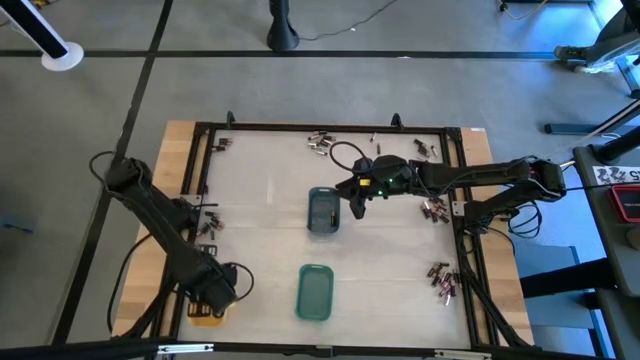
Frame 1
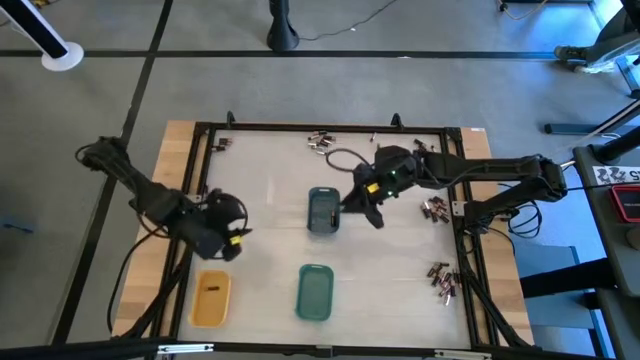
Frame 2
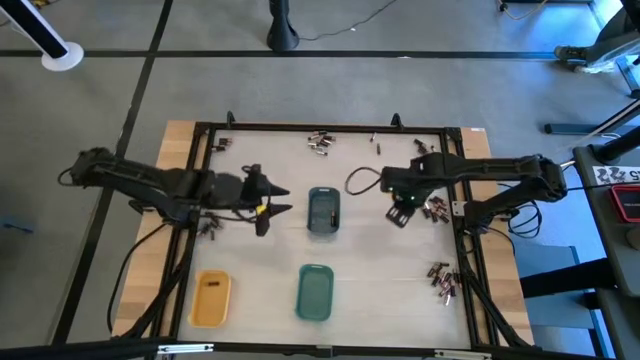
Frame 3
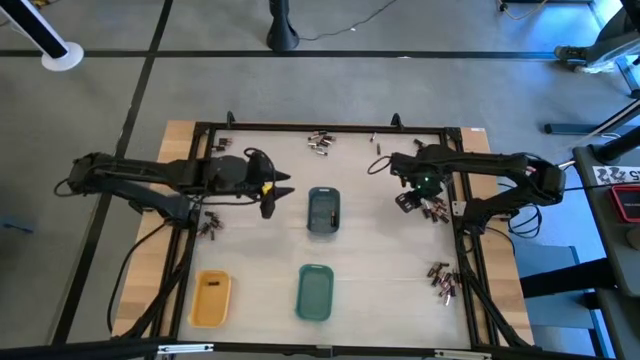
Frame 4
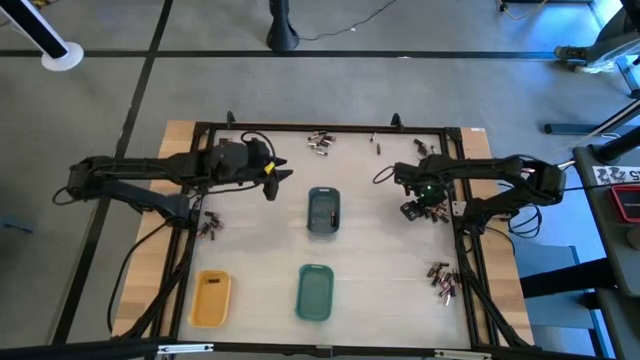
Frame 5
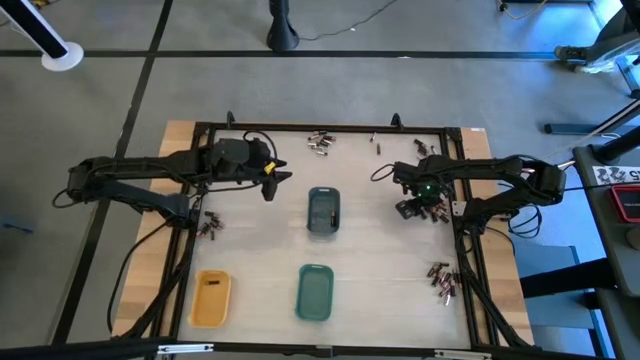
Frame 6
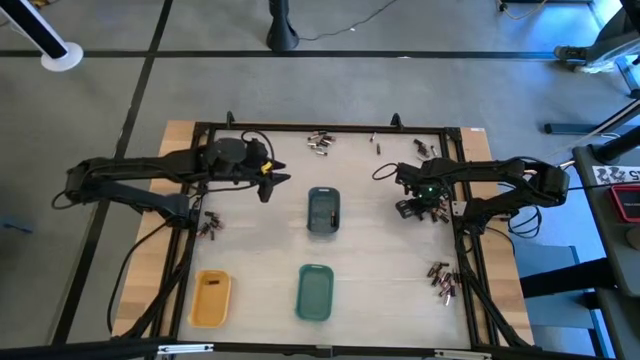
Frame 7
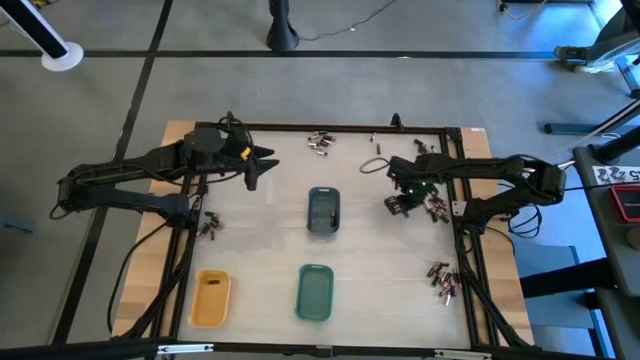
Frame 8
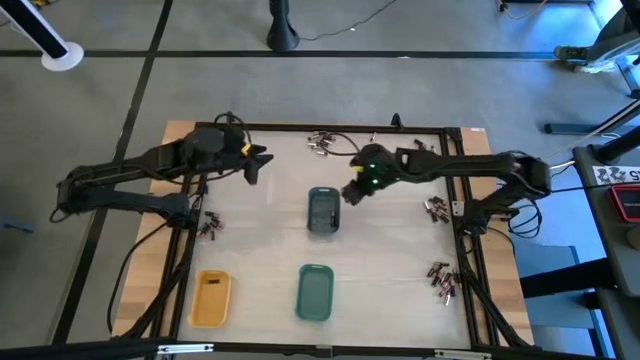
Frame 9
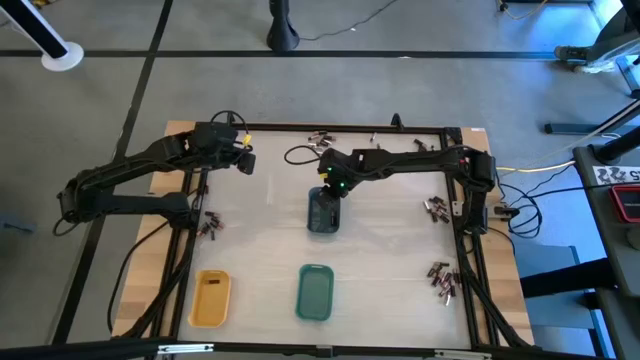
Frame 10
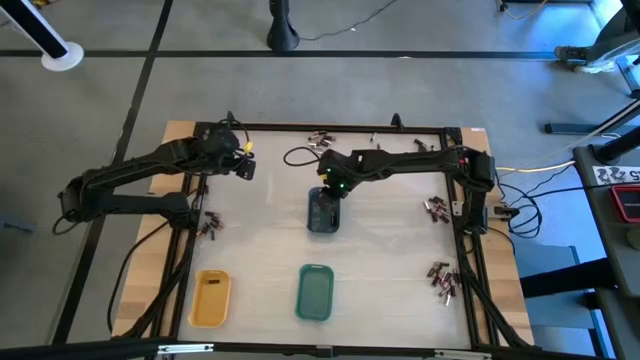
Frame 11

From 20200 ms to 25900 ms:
Task: Sort batteries
Put the large black battery into the blue bin

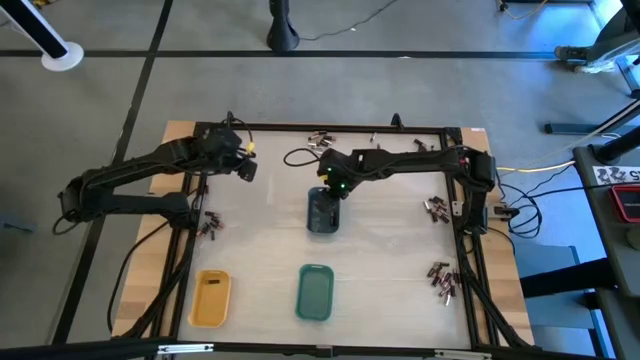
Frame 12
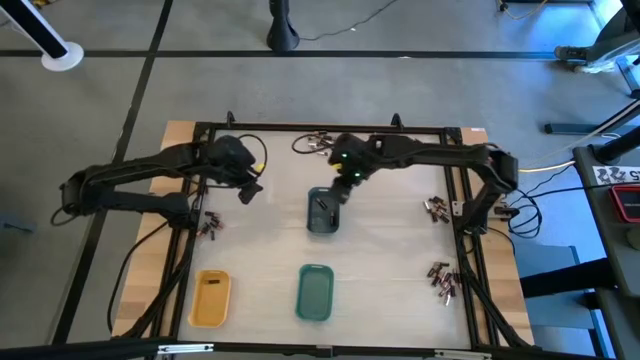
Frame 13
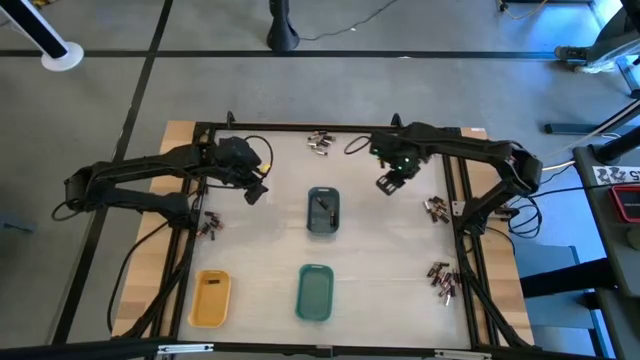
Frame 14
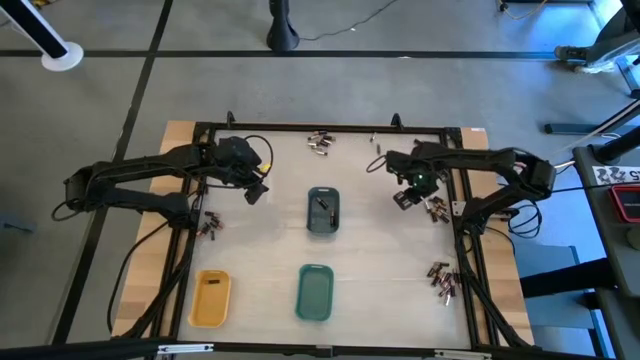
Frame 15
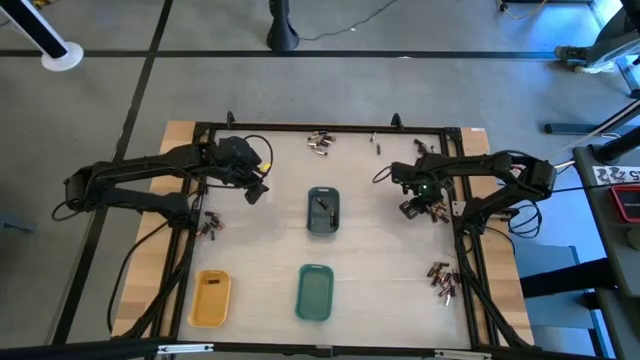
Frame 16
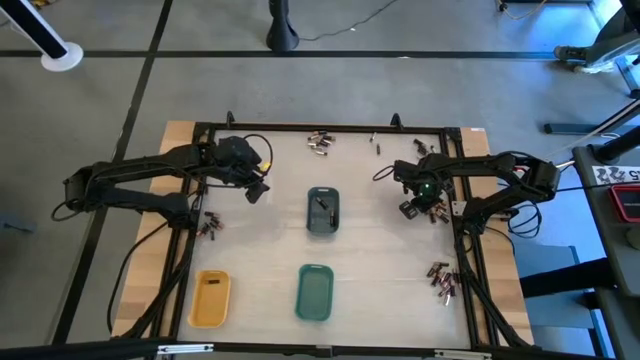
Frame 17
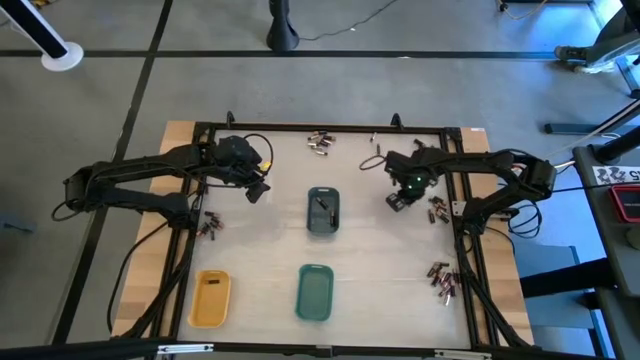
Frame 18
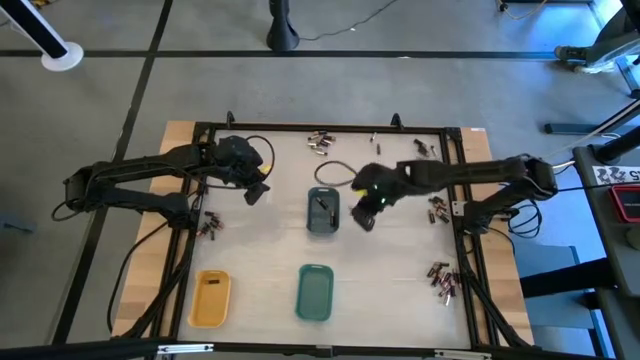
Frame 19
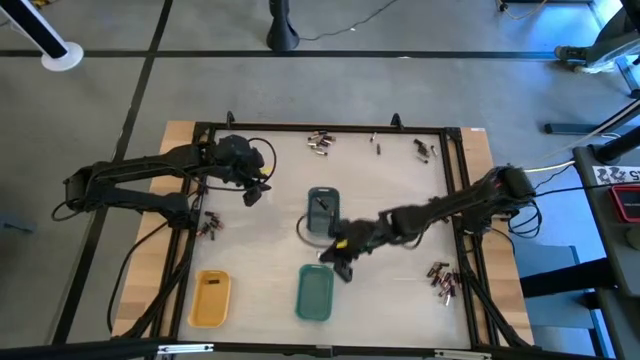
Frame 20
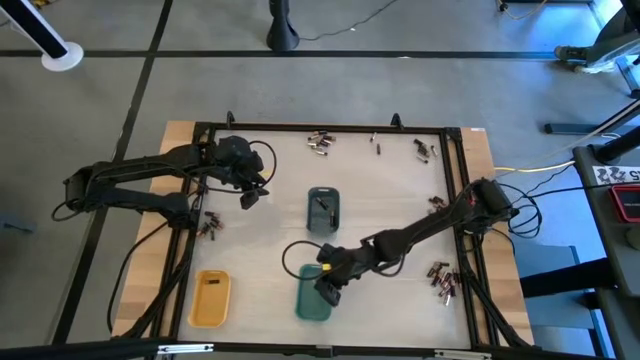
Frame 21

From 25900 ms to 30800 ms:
Put the silver battery into the green bin

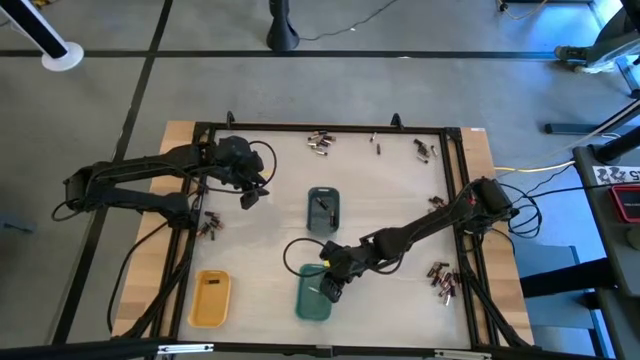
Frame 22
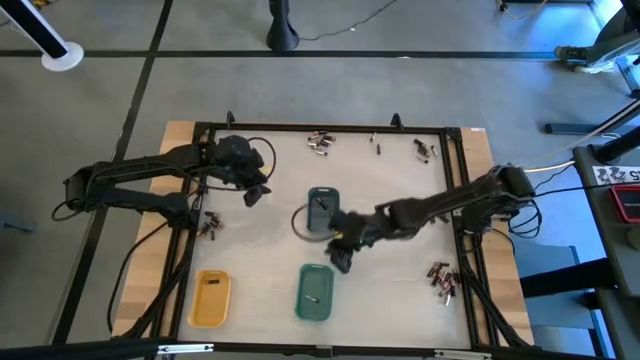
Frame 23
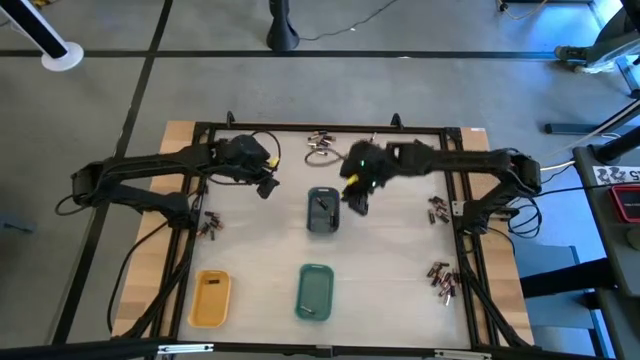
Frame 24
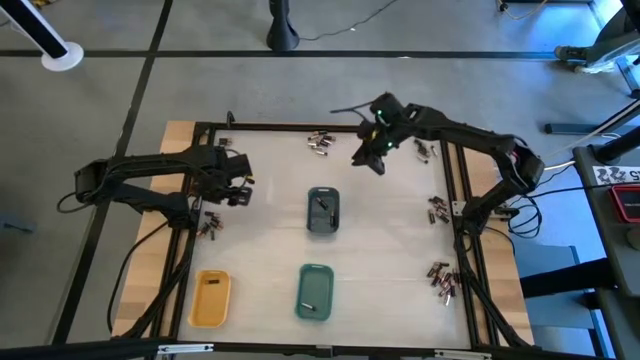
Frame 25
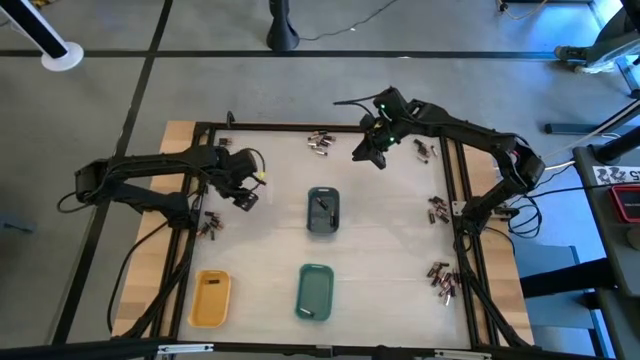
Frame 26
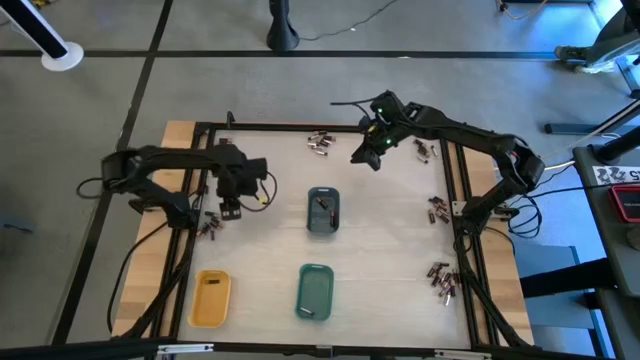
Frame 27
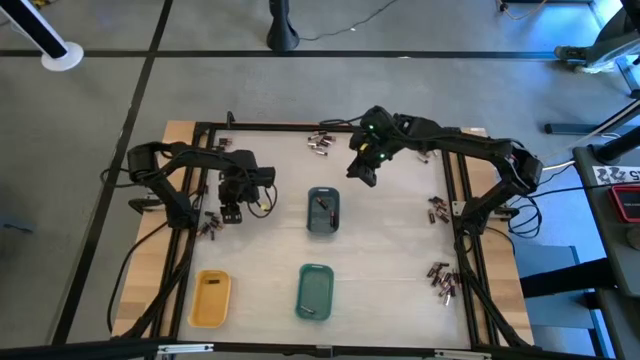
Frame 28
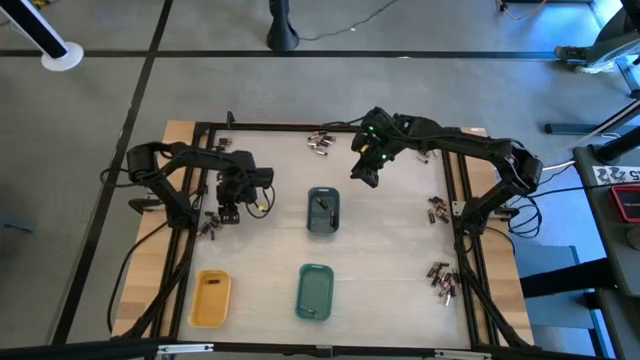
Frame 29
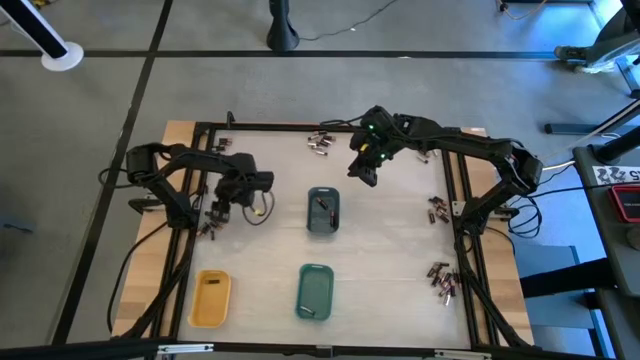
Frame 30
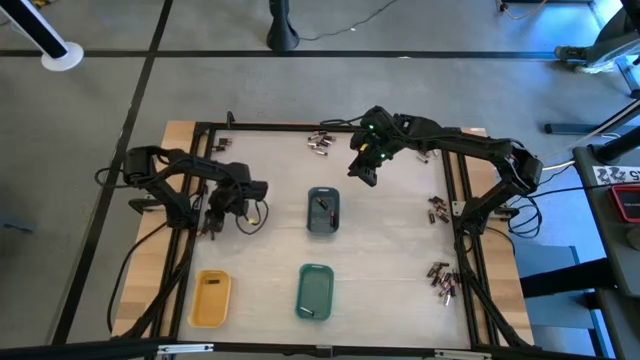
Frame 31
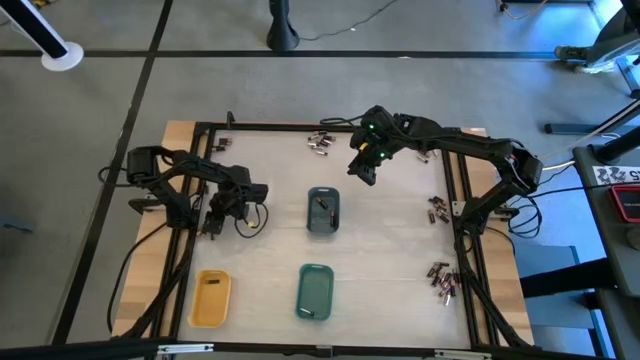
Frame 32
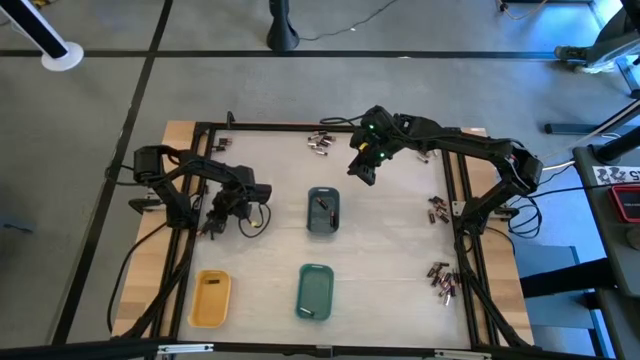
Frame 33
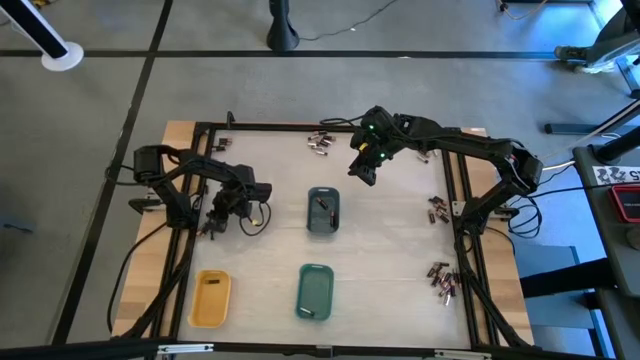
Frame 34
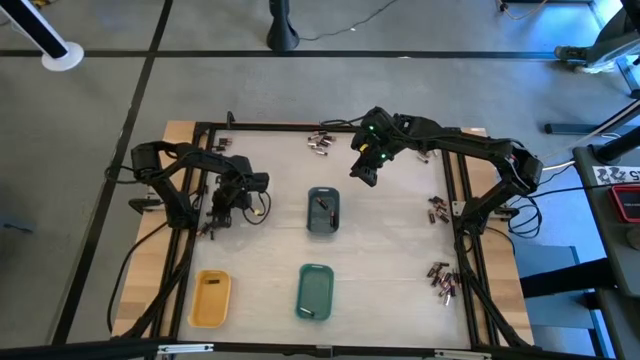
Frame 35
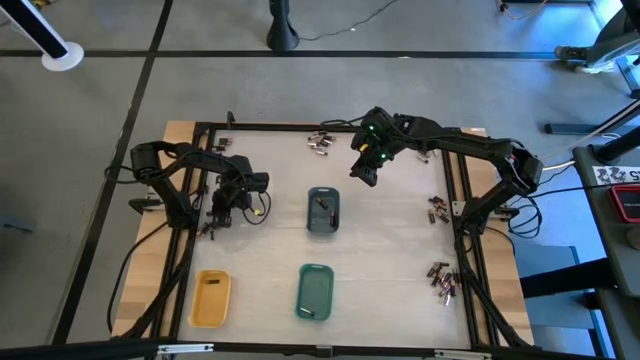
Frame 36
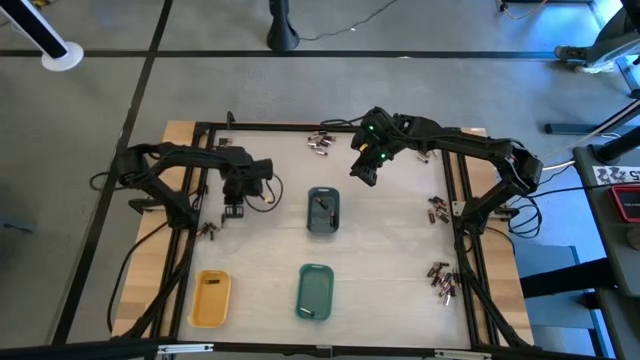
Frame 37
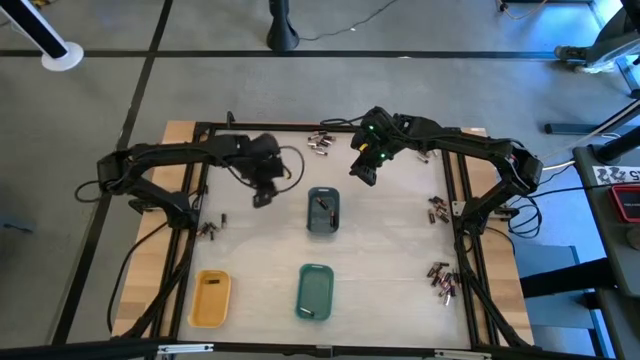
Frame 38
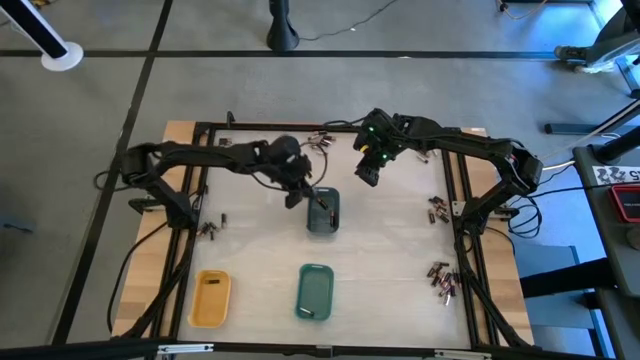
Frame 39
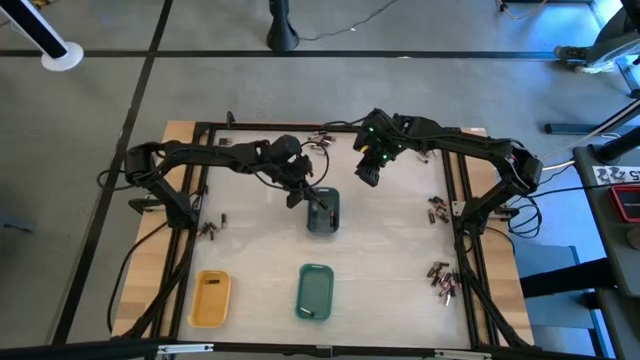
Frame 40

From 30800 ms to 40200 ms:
Put the large black battery into the blue bin

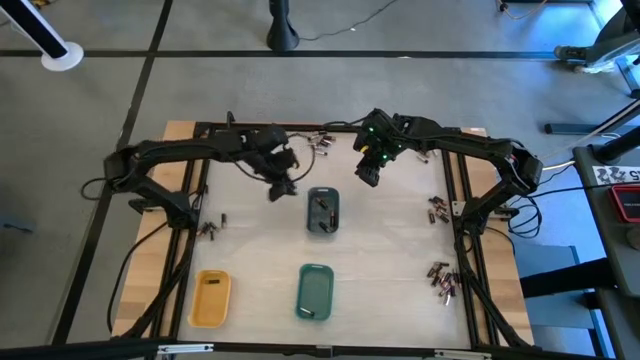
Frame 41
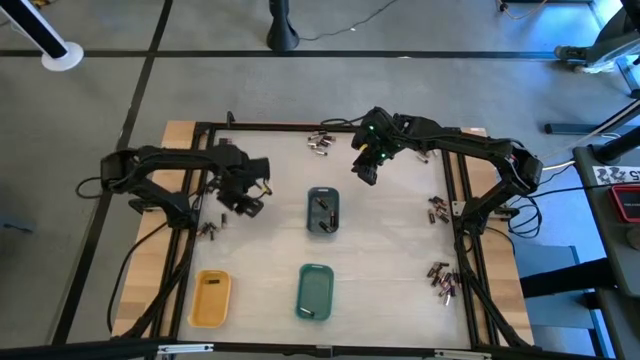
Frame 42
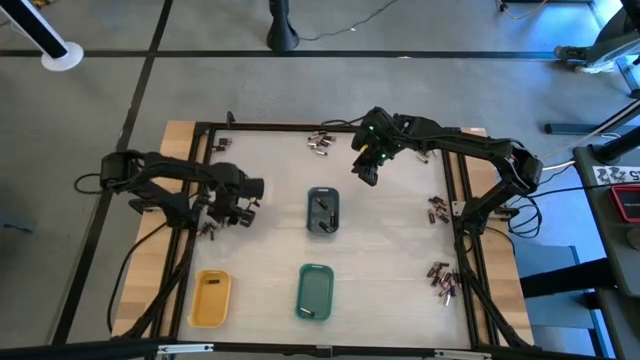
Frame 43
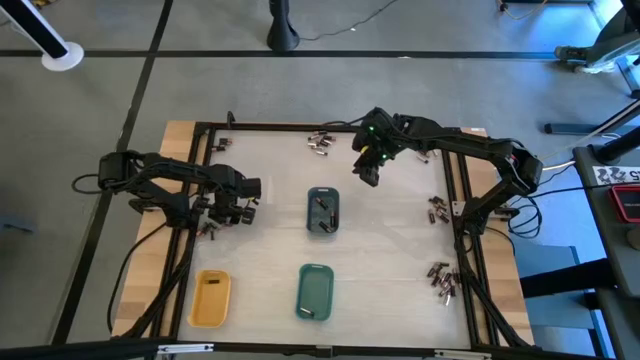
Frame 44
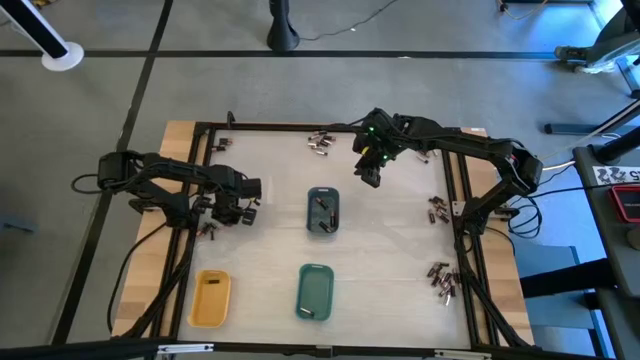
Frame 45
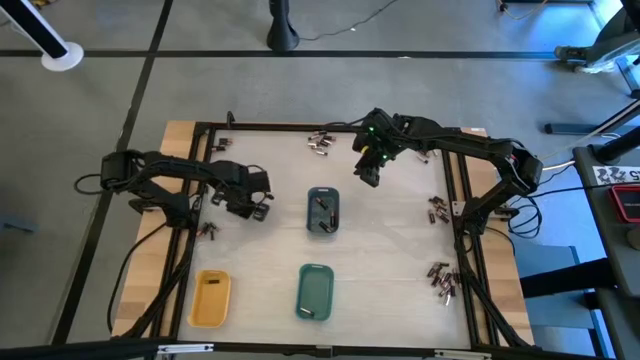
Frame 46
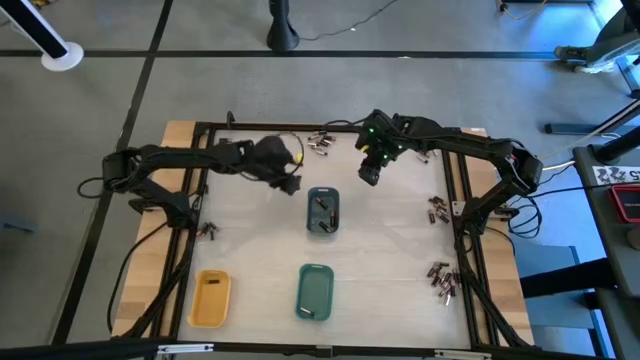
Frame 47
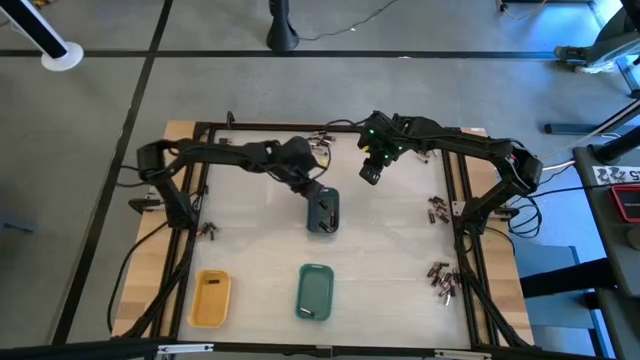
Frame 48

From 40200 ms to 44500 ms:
Put the large black battery into the blue bin
